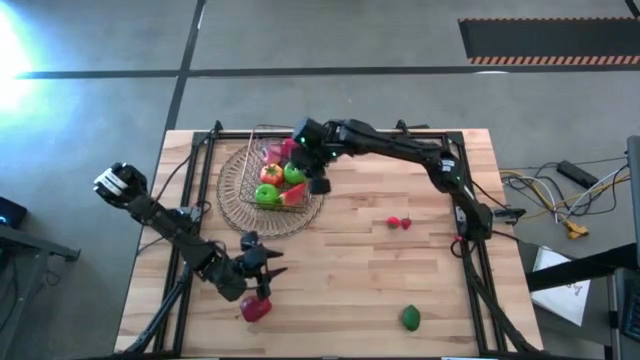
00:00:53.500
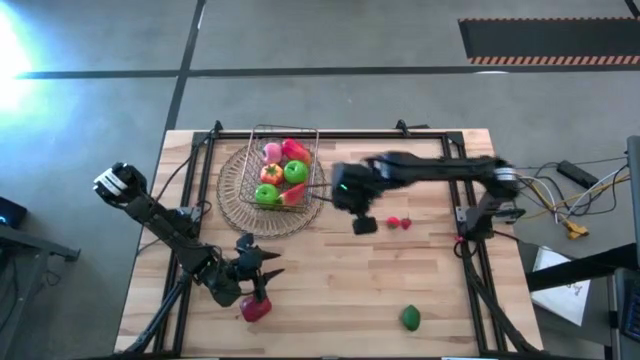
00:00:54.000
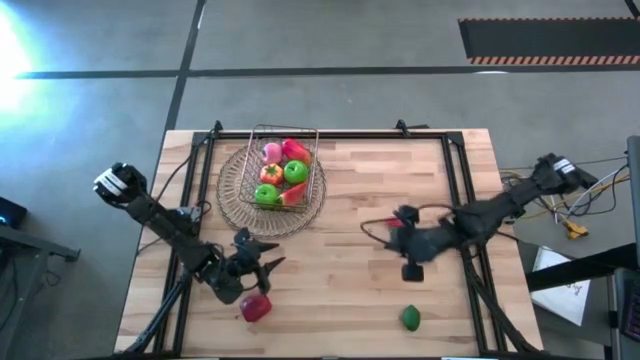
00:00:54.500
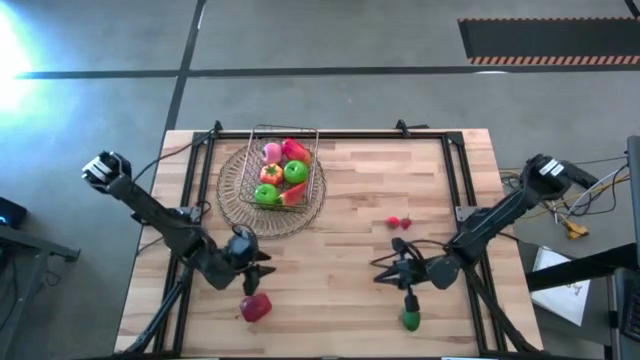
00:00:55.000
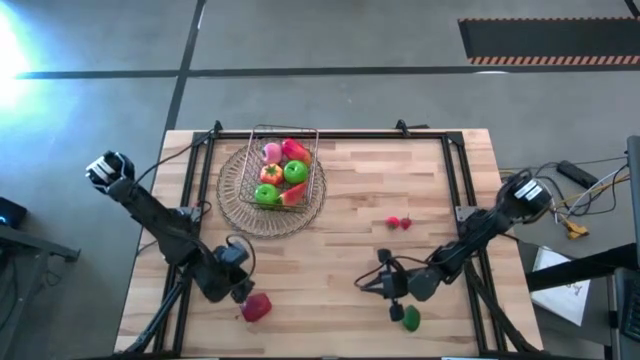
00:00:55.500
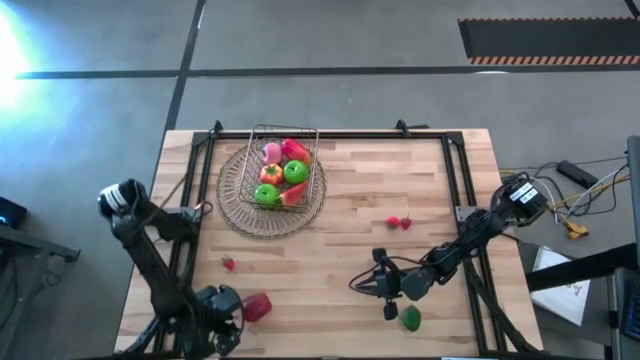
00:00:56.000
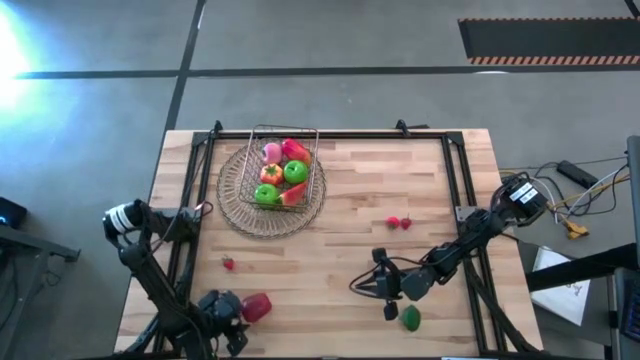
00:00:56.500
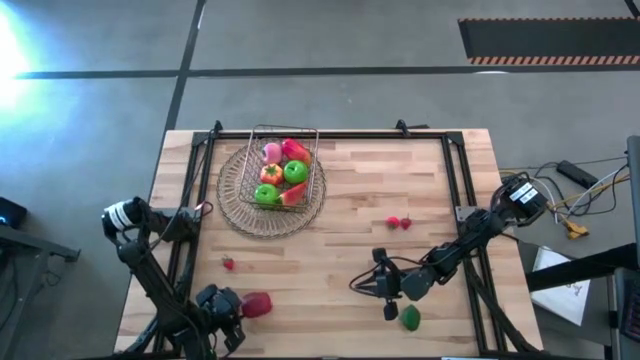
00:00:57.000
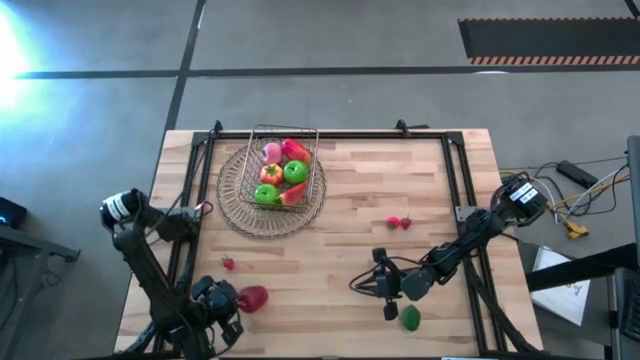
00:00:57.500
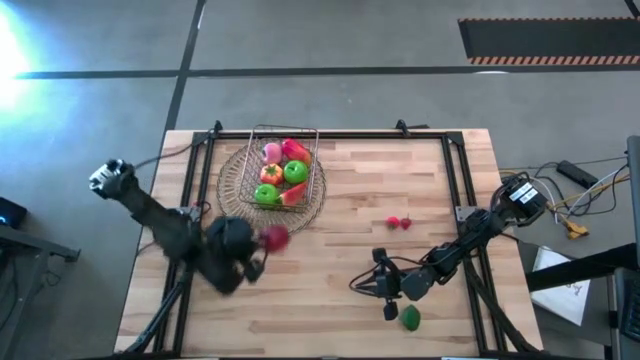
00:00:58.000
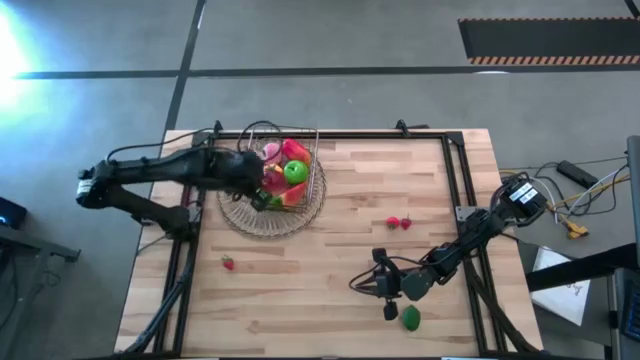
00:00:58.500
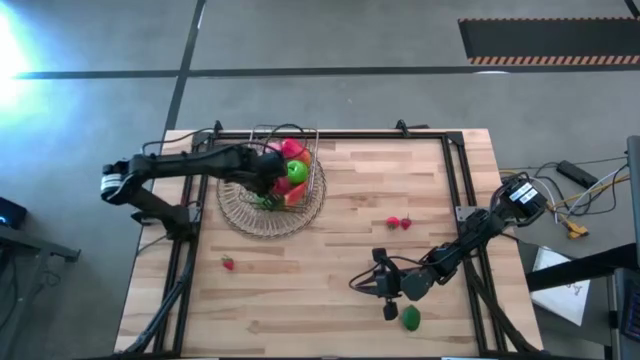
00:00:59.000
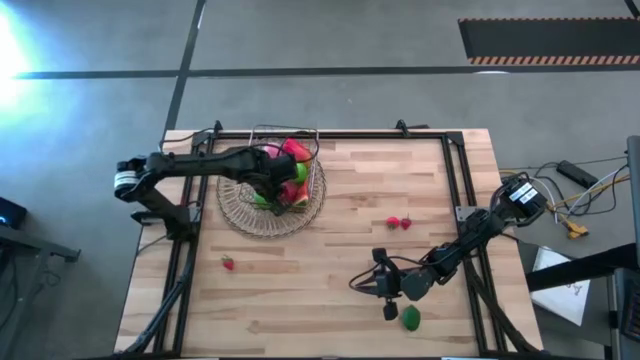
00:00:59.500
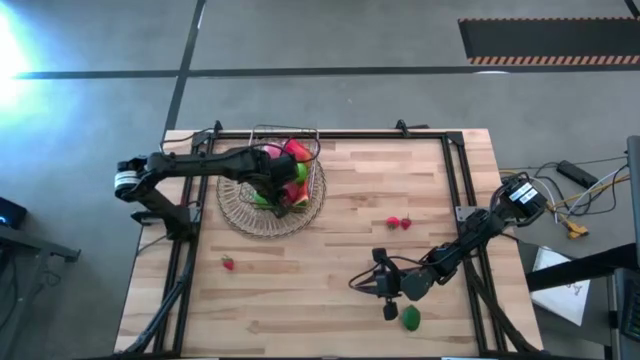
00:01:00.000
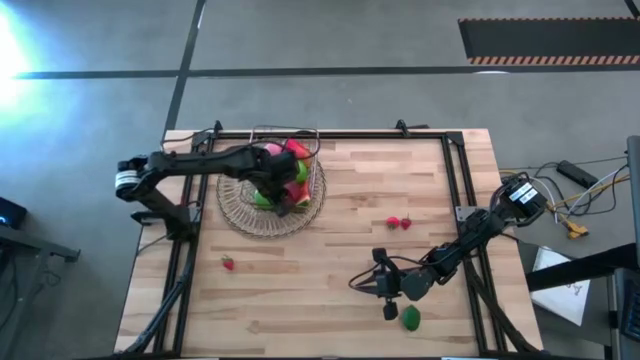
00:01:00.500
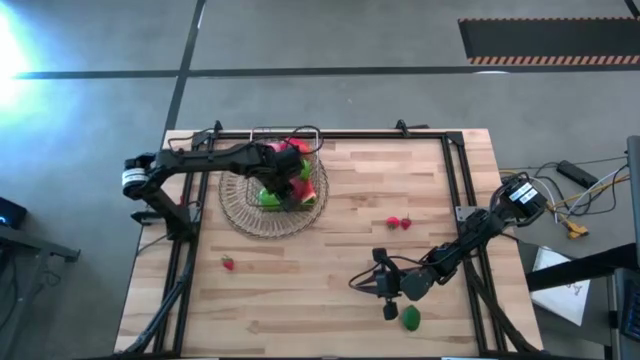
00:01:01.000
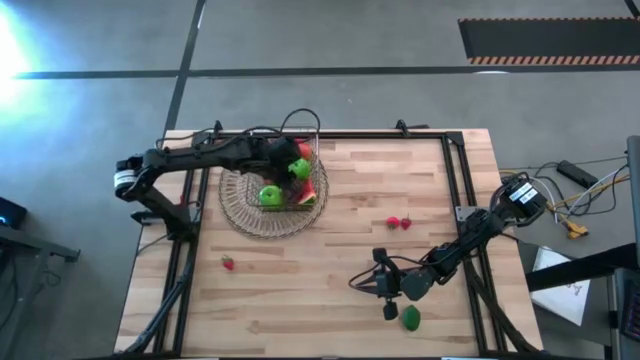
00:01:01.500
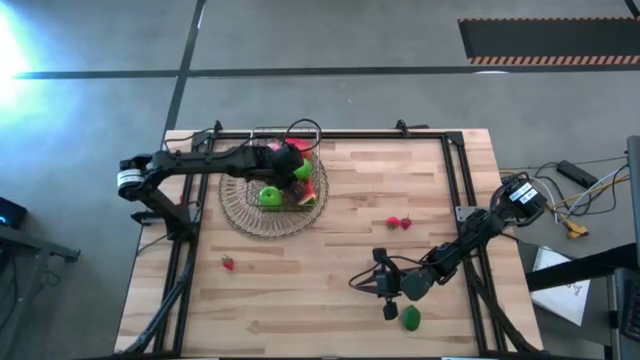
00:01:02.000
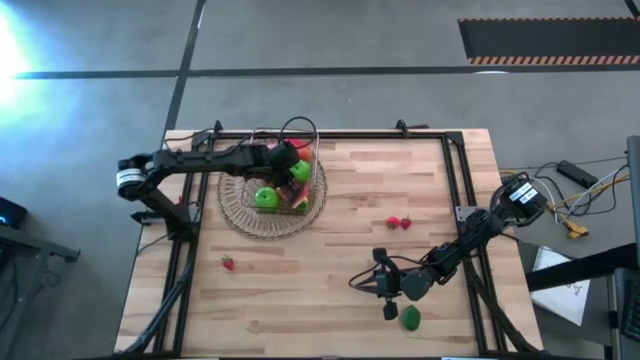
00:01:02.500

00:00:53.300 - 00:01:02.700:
Task: Build produce basket
Put the red apple into the basket

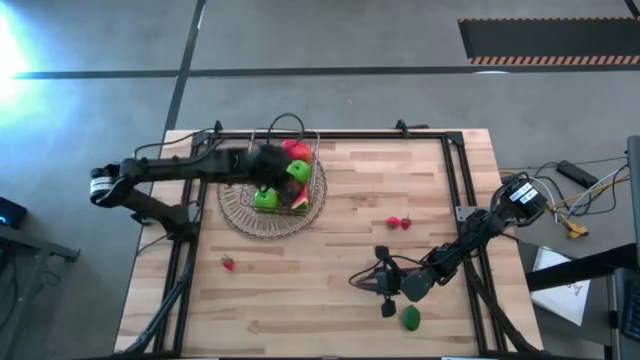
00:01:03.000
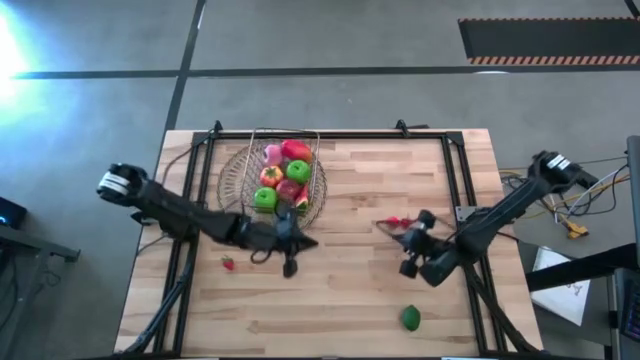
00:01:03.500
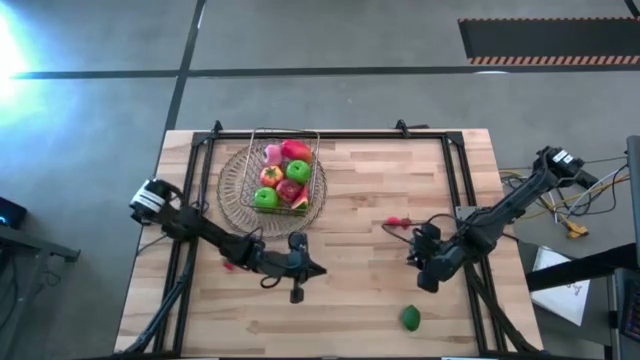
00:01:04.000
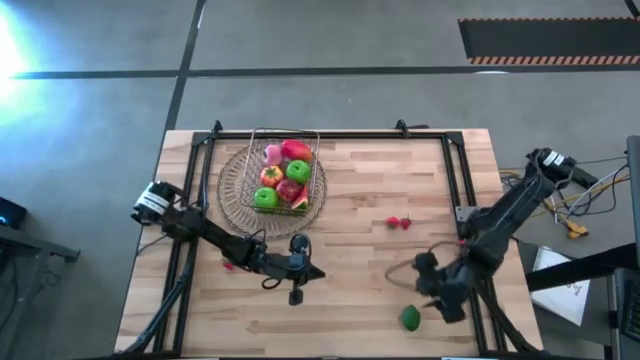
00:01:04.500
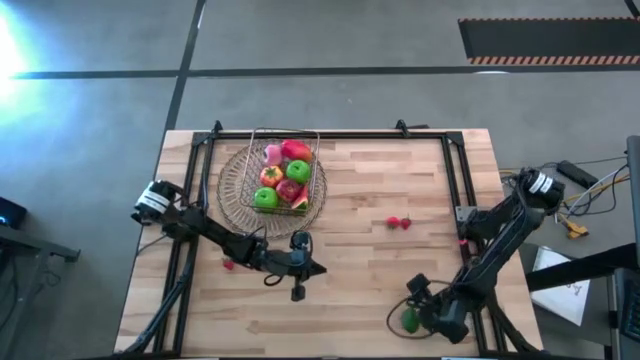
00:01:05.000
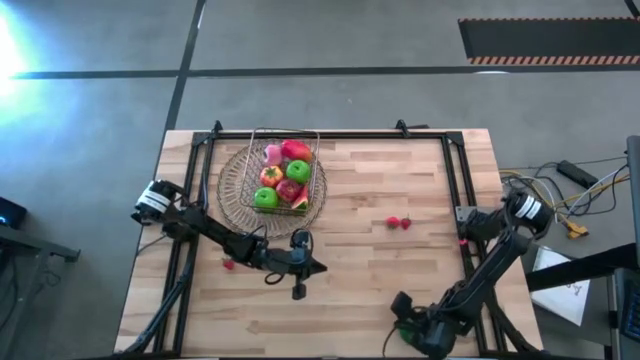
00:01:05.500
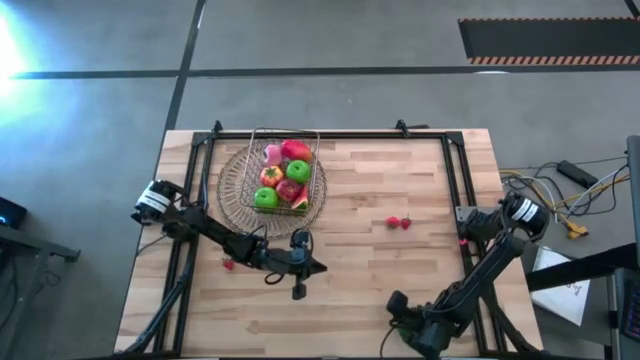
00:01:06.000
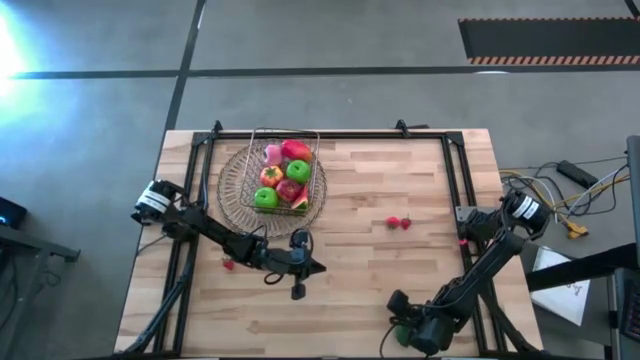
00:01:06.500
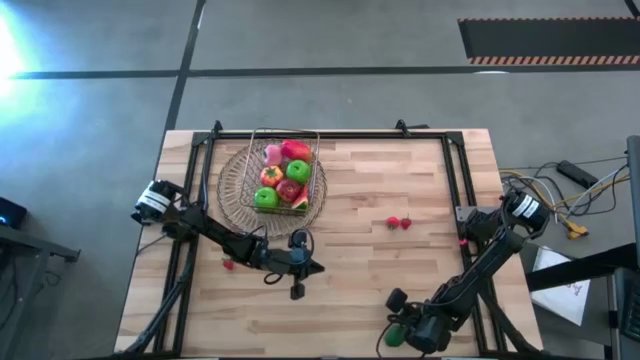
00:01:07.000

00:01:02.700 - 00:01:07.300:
Put the lime into the basket

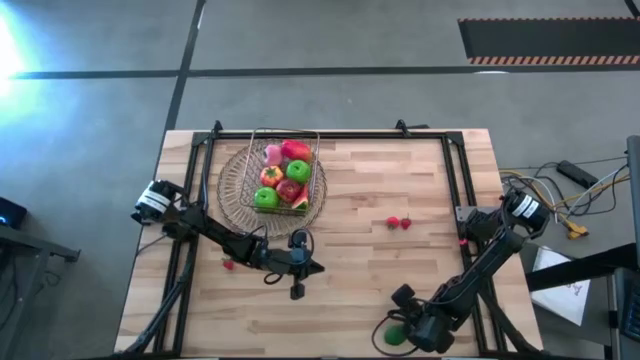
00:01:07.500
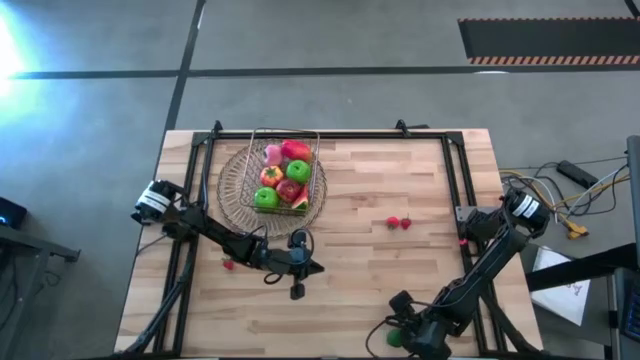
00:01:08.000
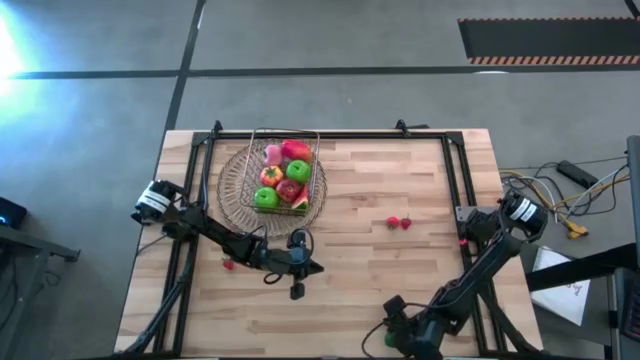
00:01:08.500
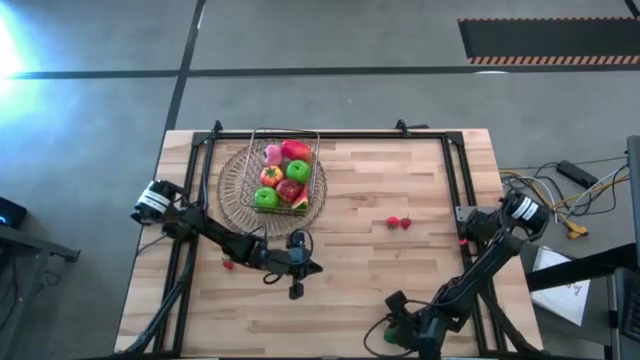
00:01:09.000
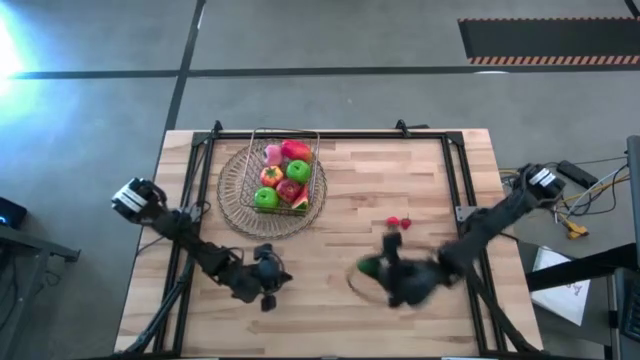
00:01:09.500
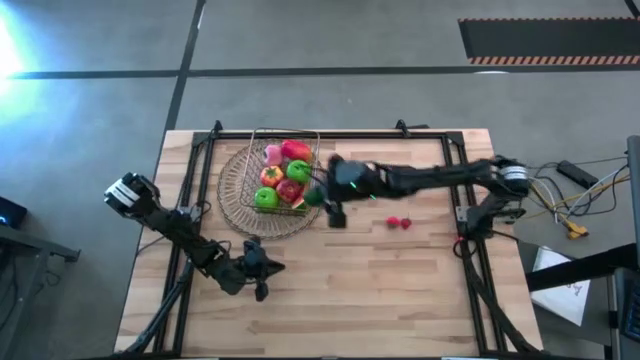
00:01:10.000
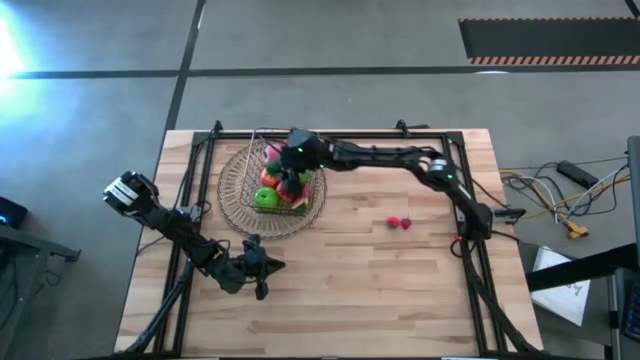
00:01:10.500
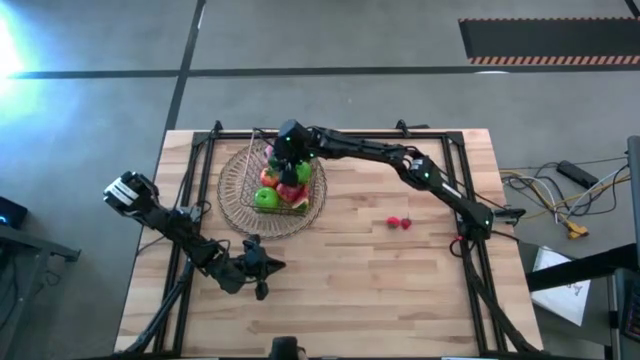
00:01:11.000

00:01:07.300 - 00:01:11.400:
Put the lime into the basket

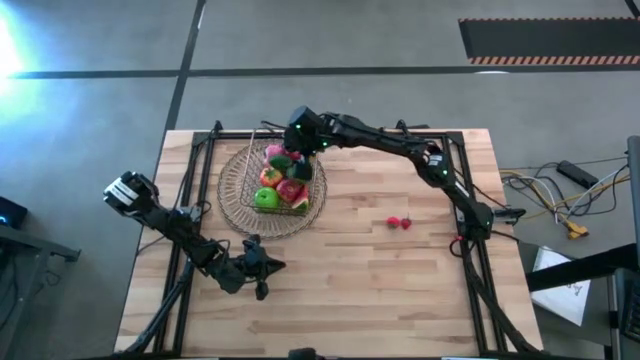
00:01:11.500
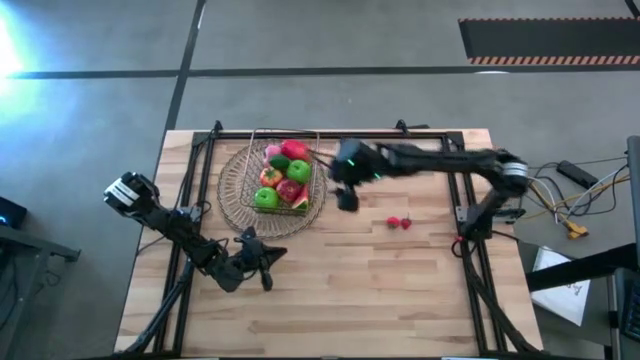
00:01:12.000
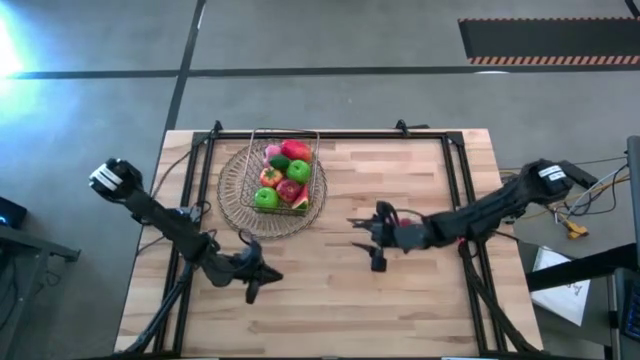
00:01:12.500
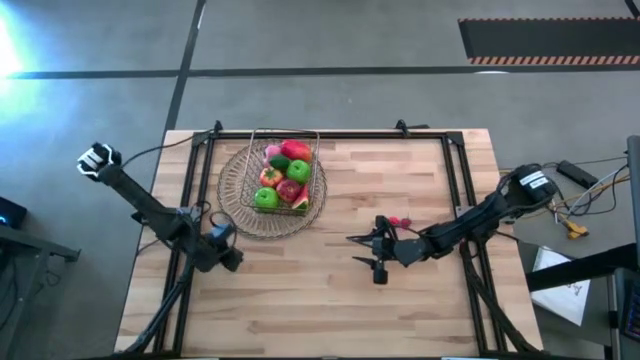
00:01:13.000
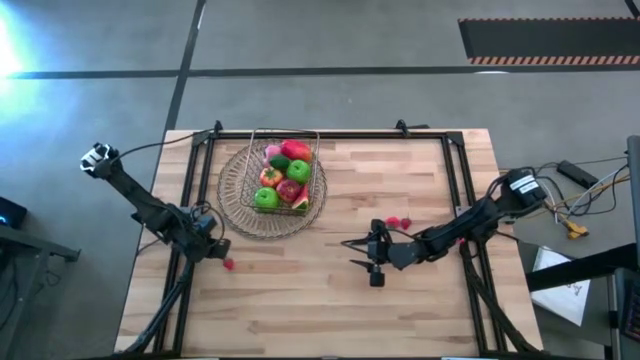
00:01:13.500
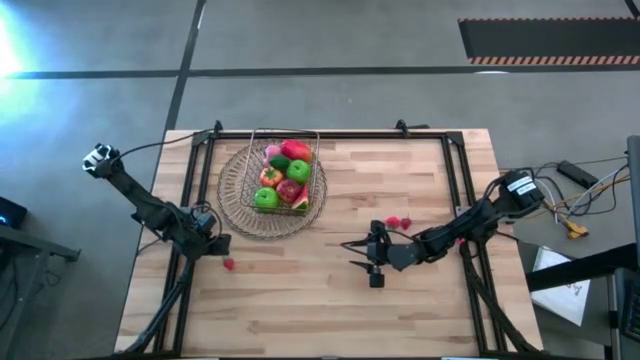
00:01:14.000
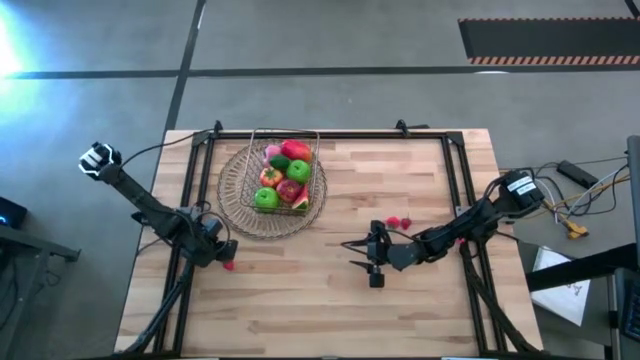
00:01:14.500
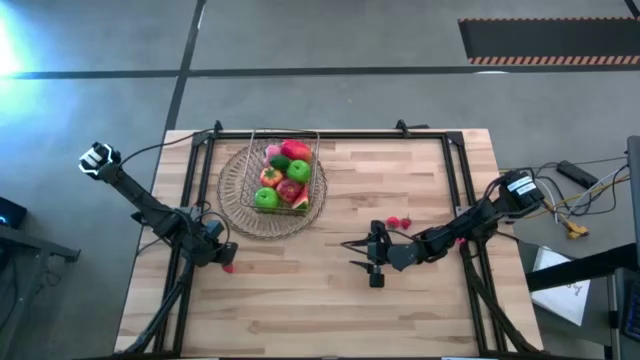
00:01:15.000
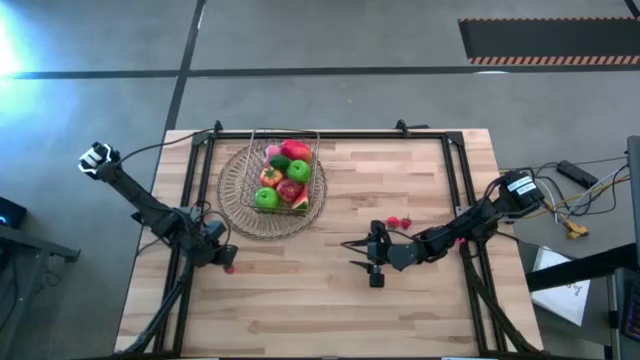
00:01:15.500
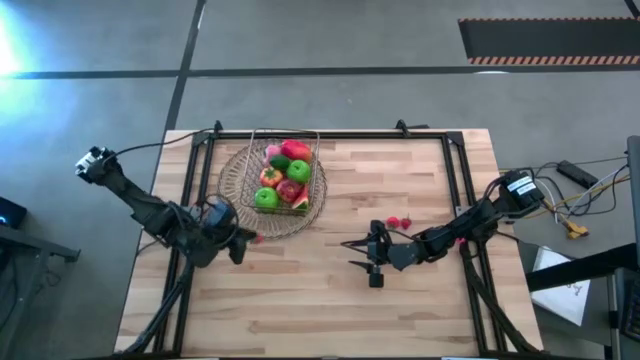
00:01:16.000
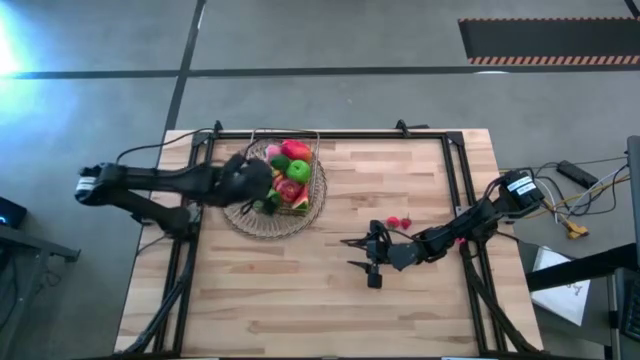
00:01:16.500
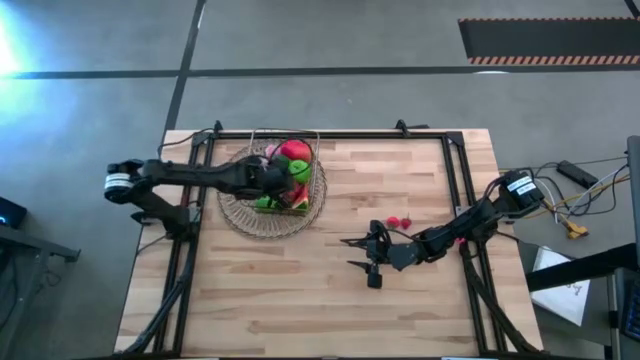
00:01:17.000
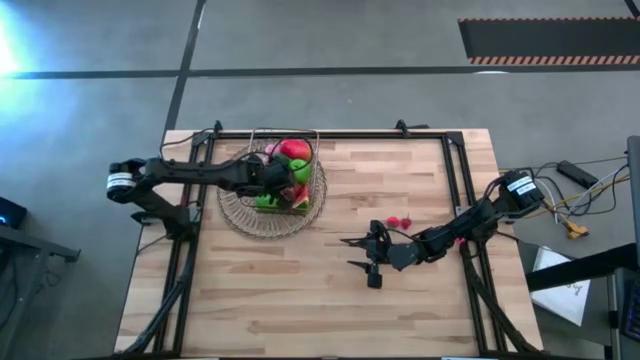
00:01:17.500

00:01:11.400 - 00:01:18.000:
Put the bottom left strawberry into the basket
